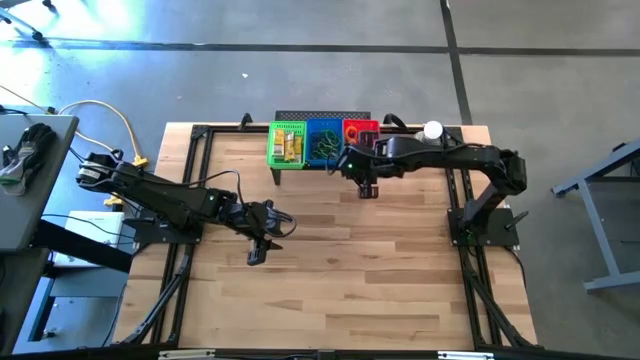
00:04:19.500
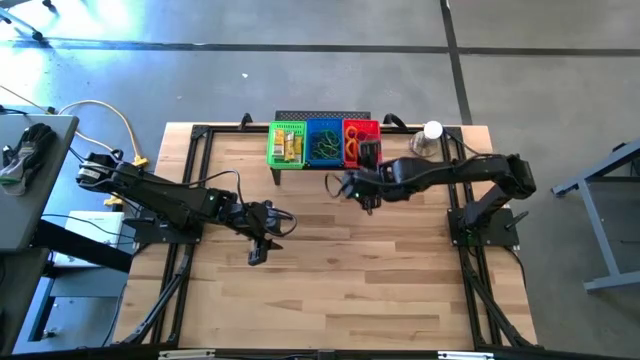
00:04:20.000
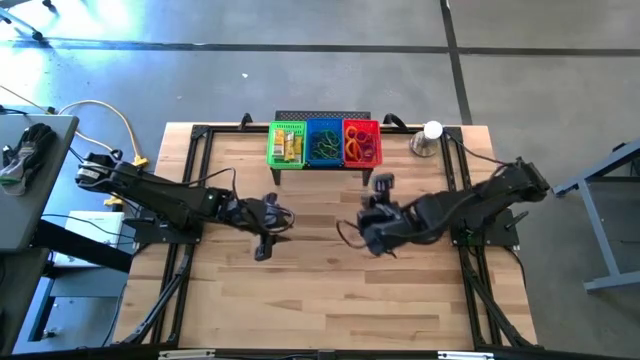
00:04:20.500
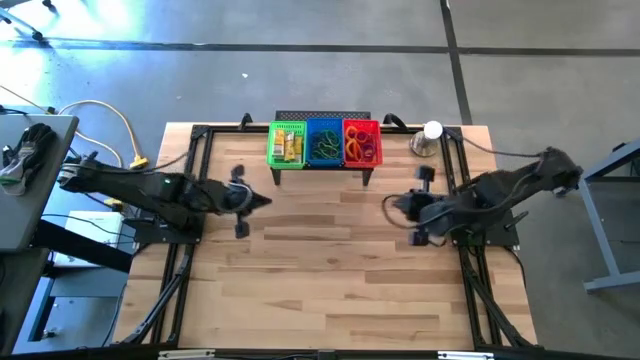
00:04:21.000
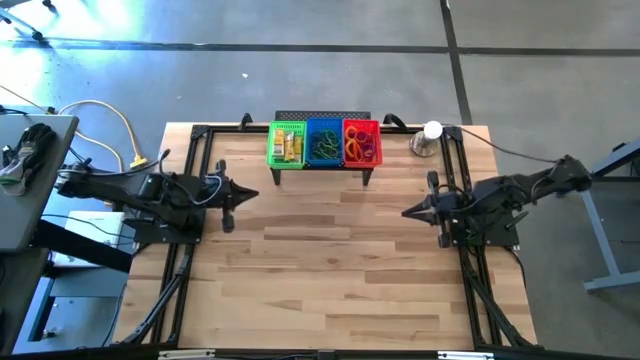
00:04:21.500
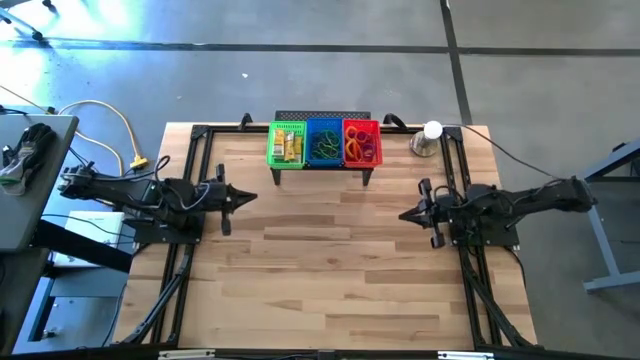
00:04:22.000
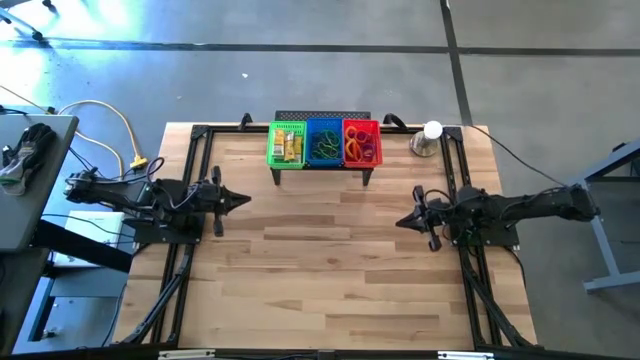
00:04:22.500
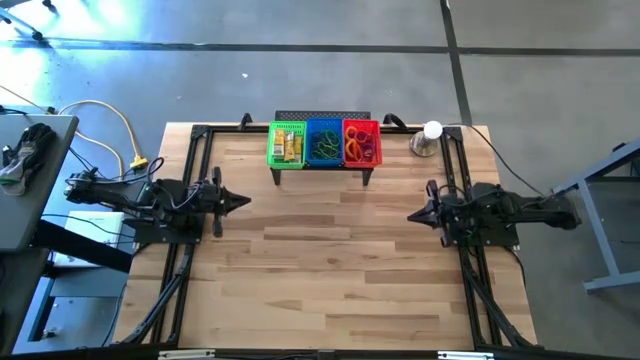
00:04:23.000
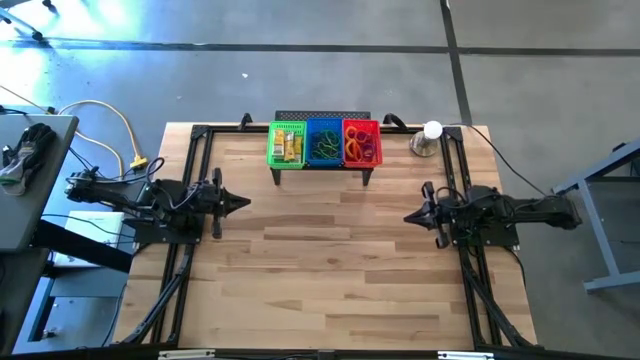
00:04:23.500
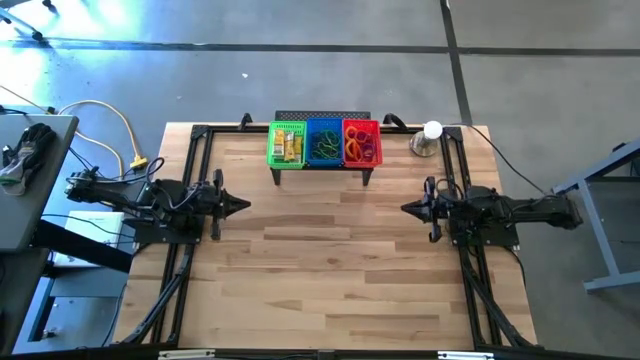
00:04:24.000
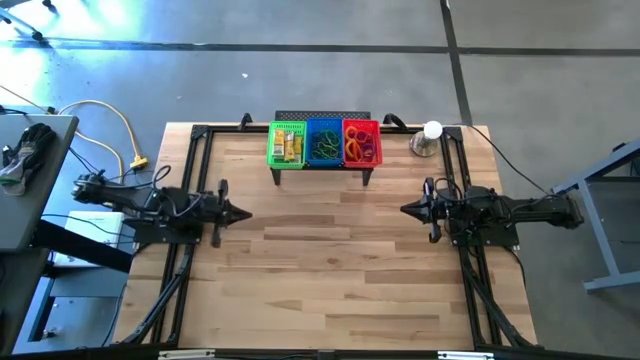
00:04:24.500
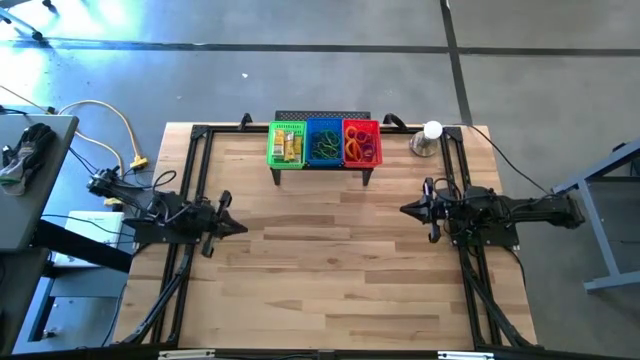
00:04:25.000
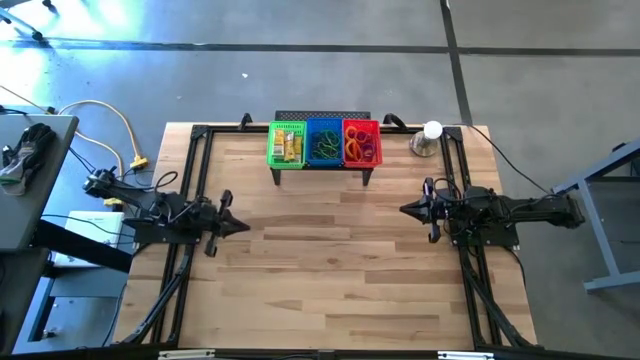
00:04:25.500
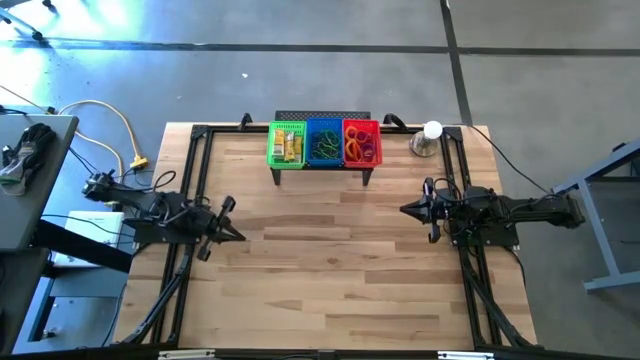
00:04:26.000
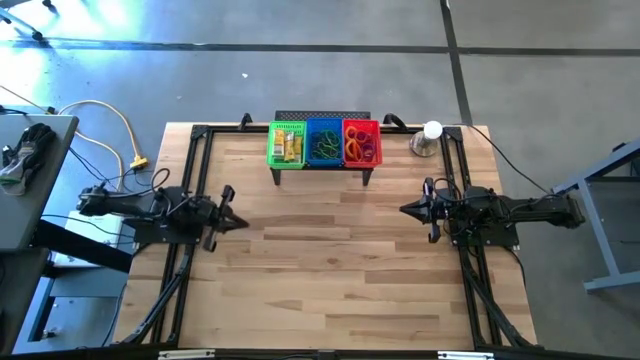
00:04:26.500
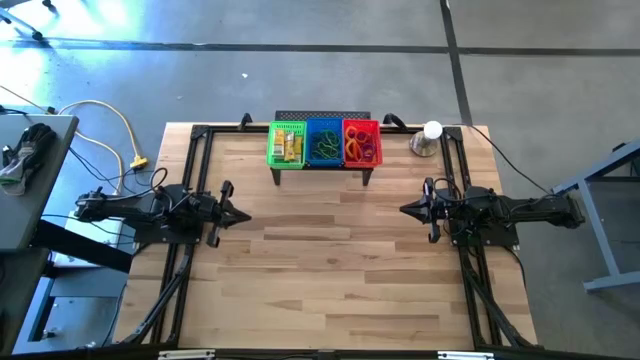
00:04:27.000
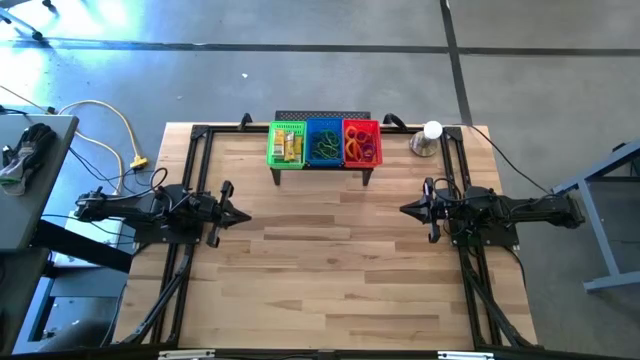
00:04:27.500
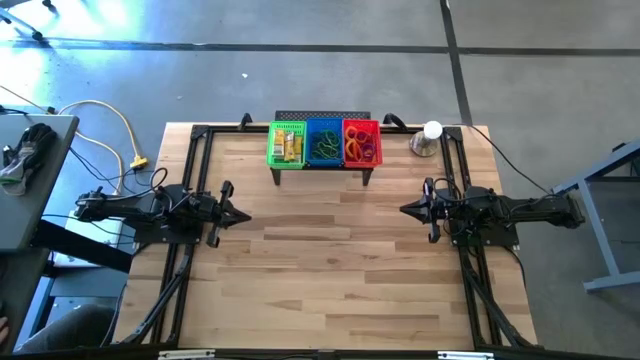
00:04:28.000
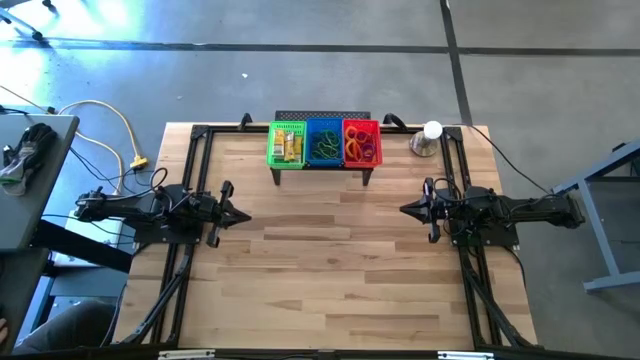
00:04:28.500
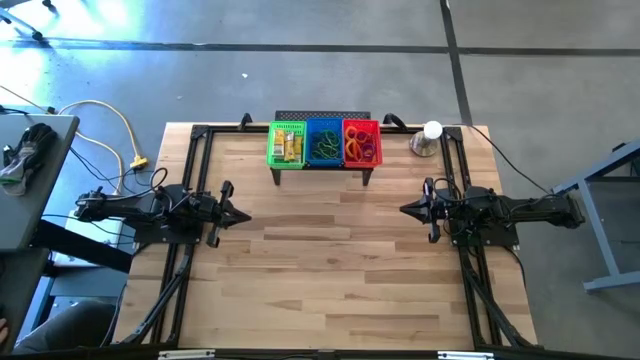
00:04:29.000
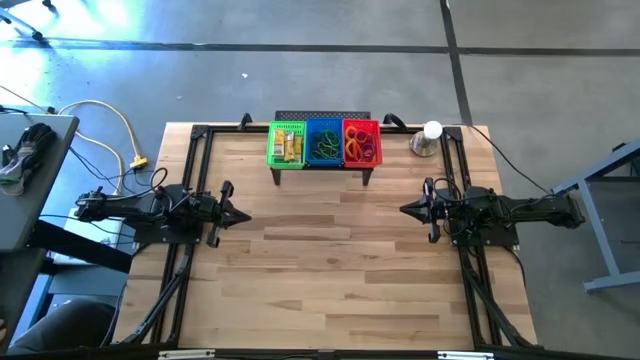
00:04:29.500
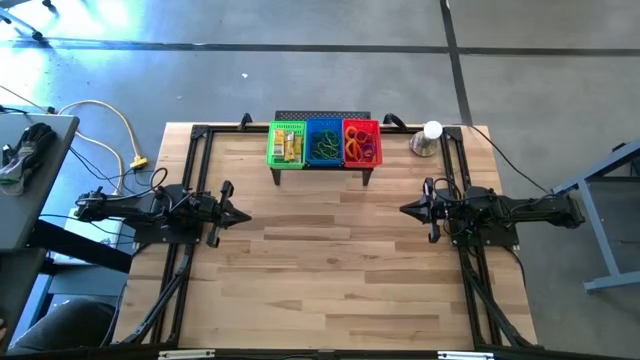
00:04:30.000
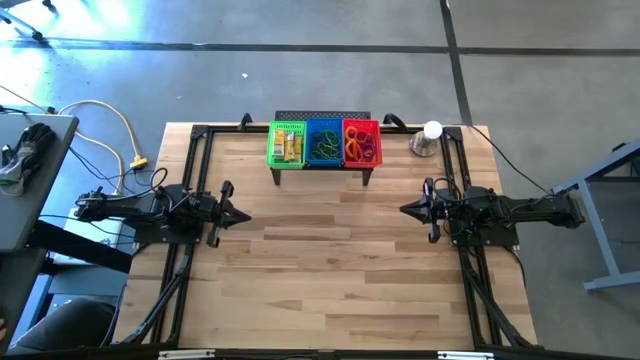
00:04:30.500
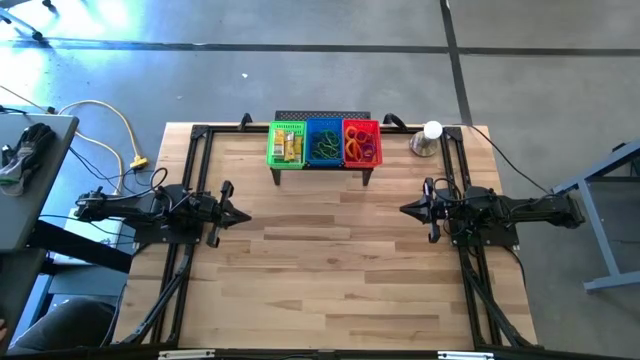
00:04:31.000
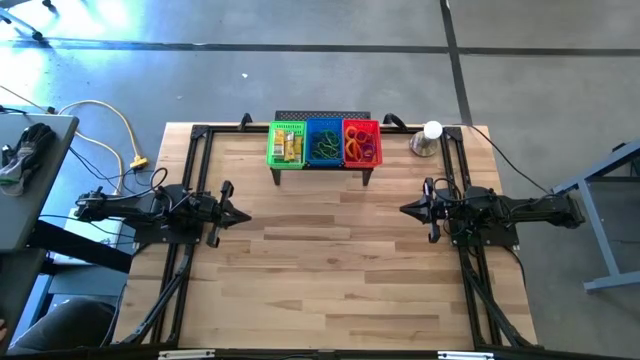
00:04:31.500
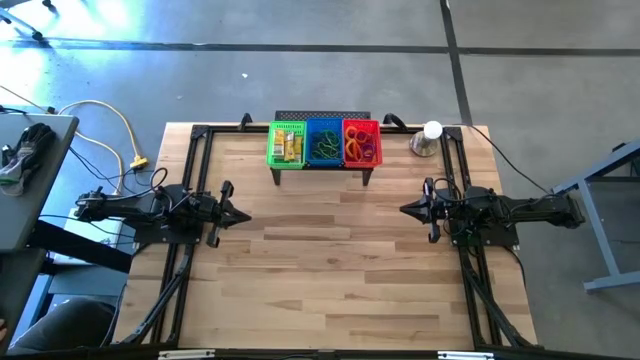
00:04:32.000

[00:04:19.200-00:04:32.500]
Task: Pick & Place Office Desk Supplies
Return to Home Position

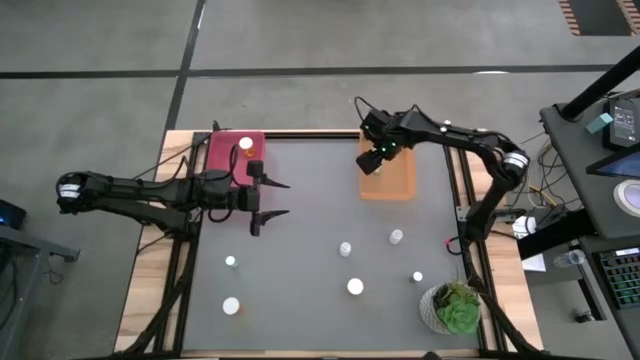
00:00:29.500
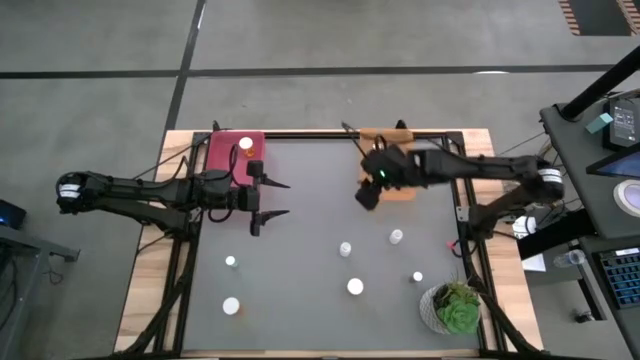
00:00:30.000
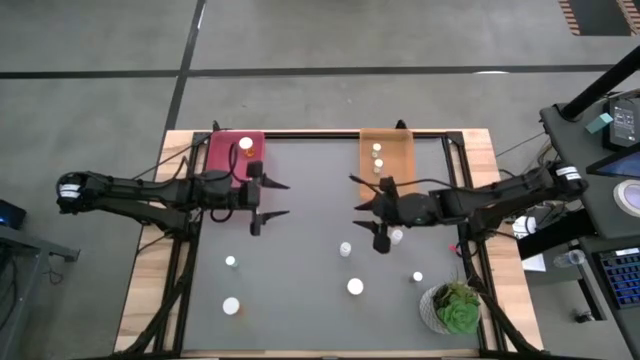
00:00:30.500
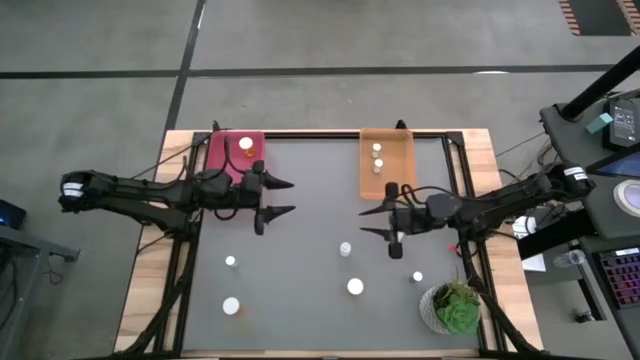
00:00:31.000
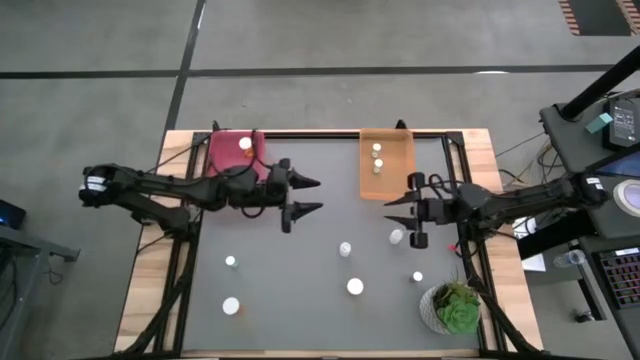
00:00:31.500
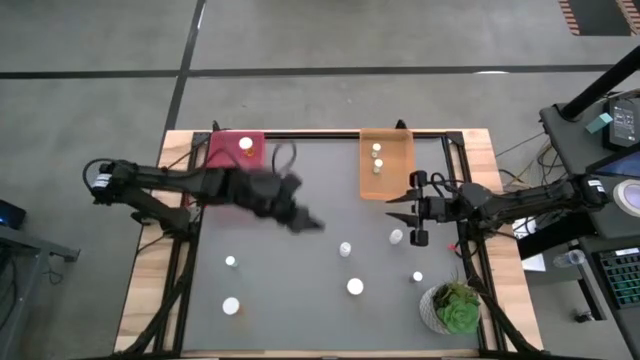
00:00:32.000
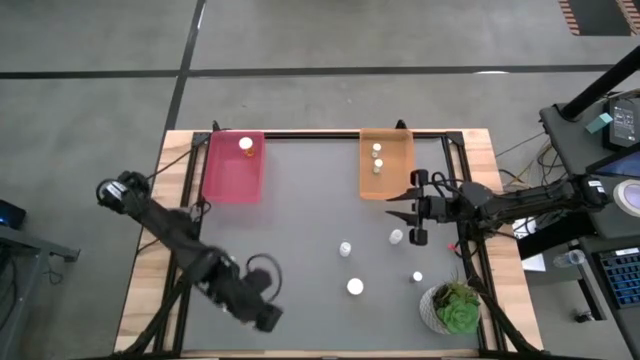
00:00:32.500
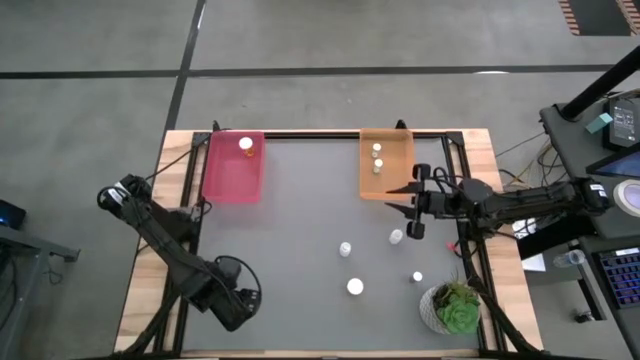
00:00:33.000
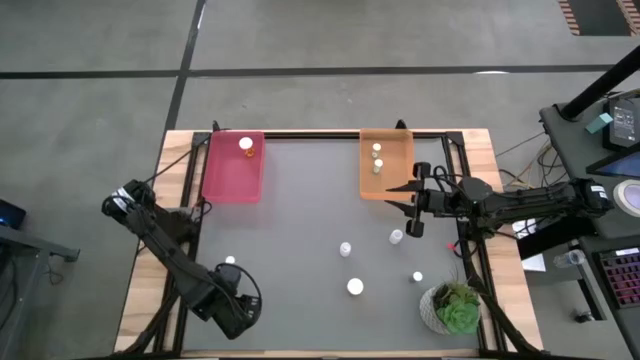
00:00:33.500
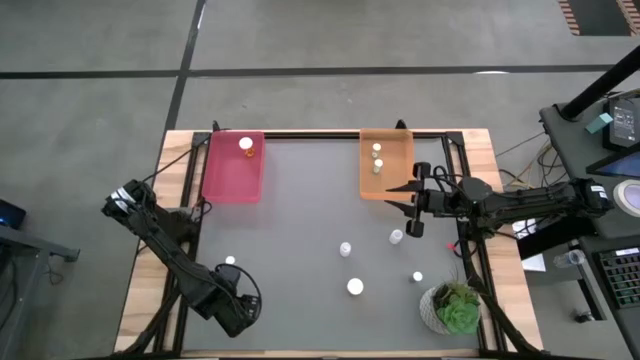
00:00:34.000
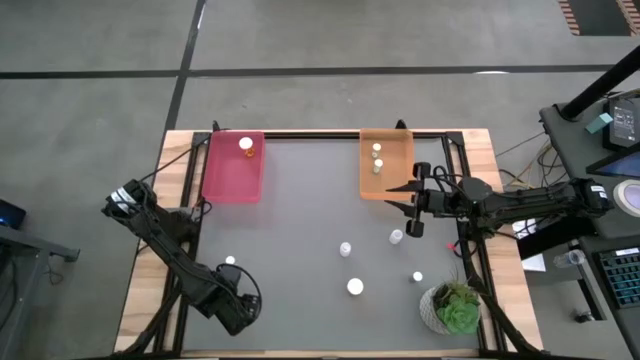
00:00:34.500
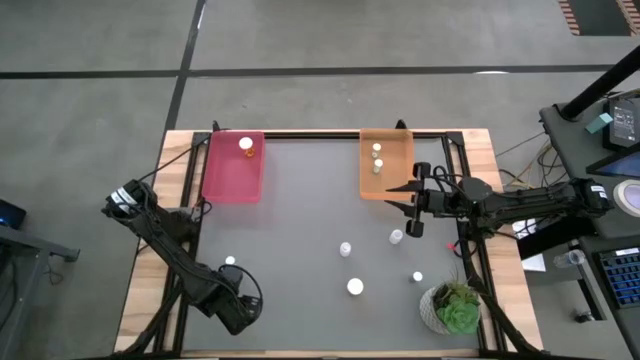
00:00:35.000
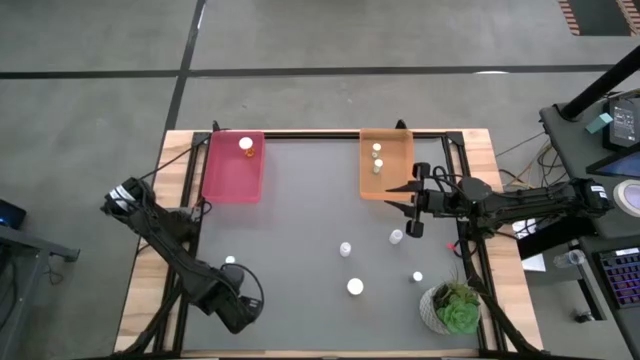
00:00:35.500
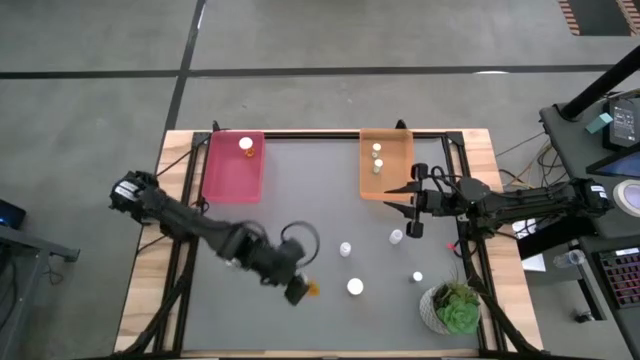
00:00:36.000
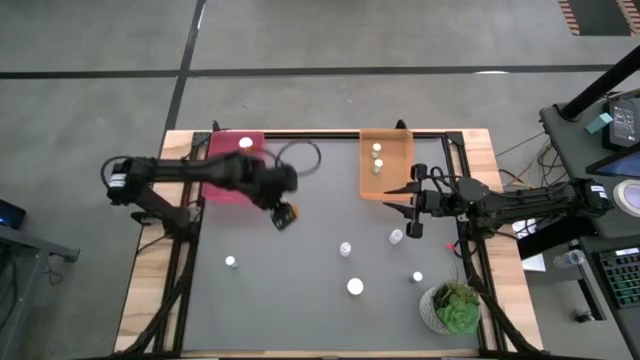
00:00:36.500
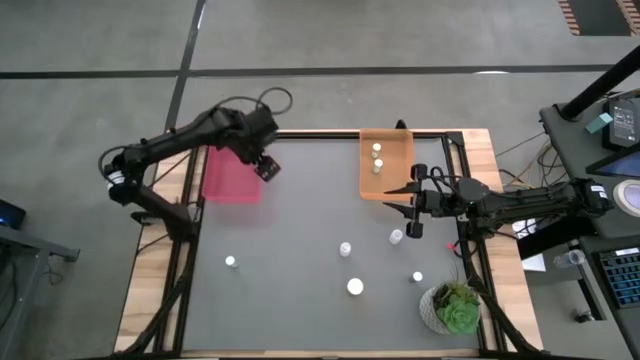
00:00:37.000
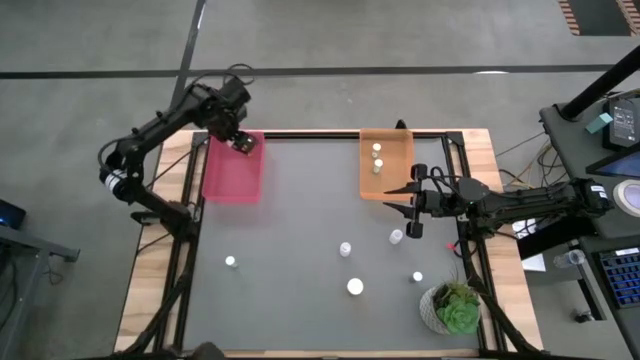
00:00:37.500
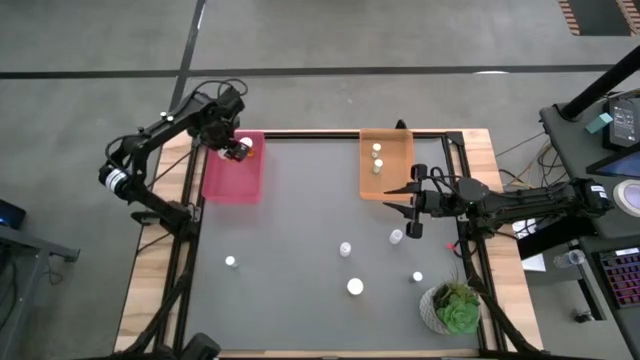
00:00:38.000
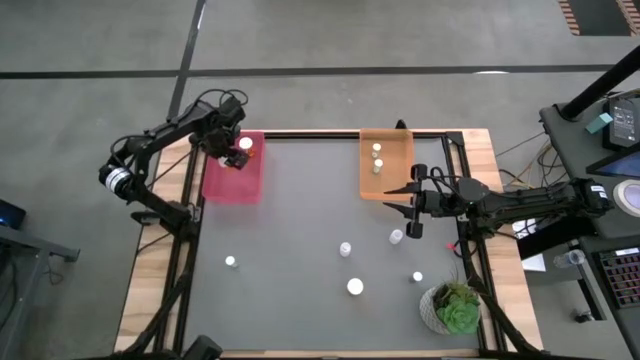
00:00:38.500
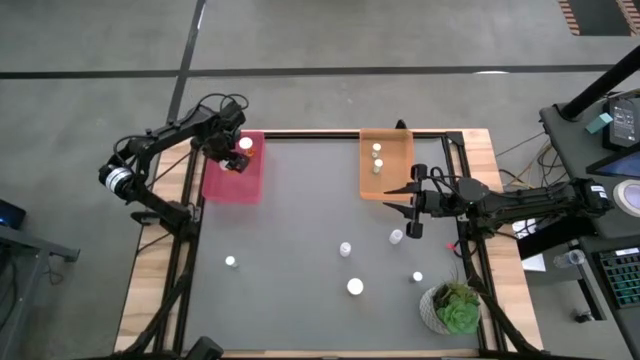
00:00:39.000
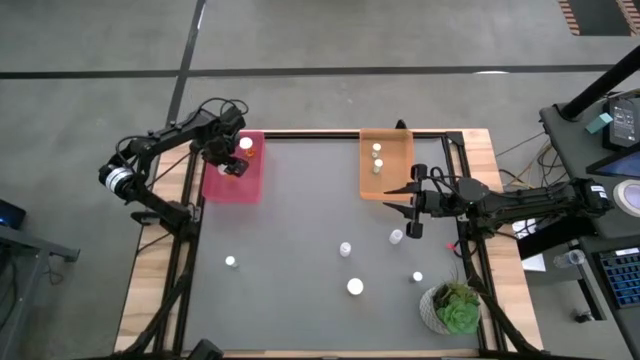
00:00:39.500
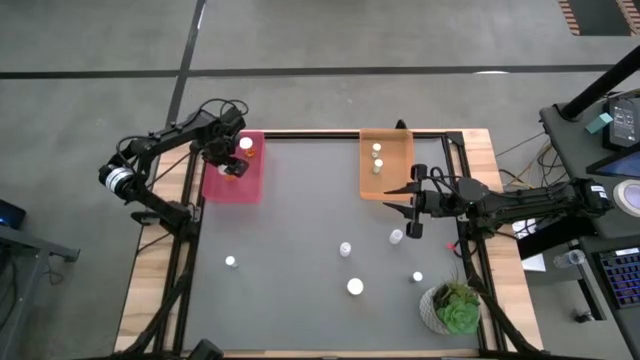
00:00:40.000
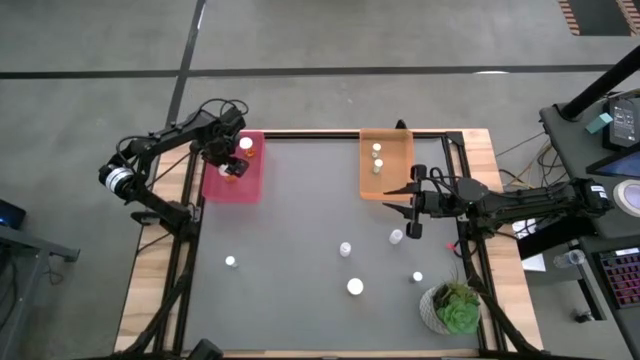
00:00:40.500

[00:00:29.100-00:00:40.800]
Task: Pick and place medicine bottles into bin by pill shape (circle, oval)
Put the left orange capsule bottle into the pink bin
